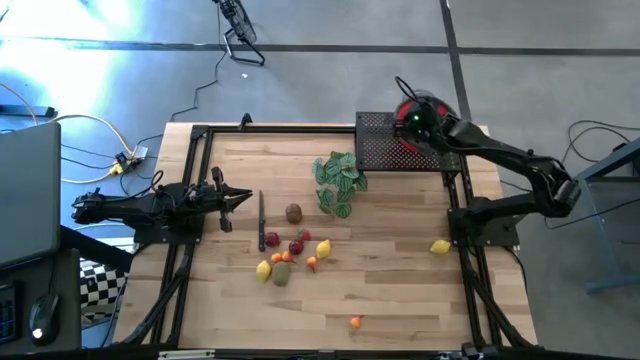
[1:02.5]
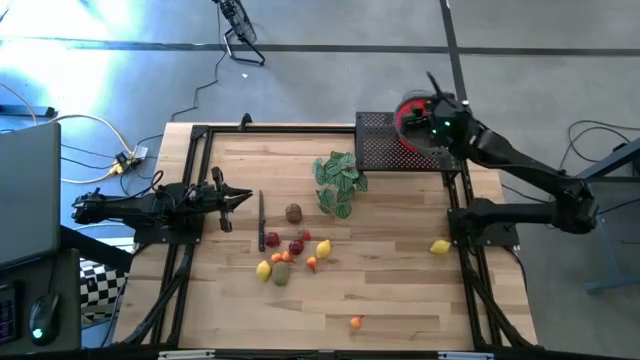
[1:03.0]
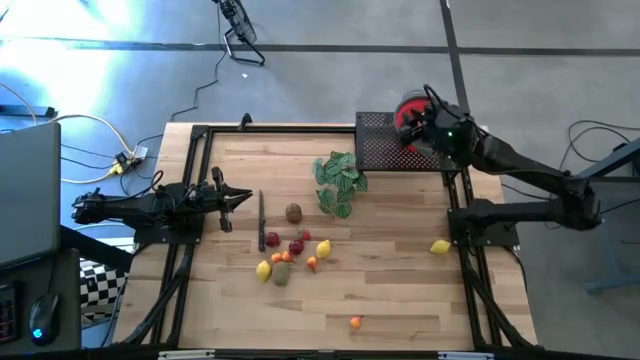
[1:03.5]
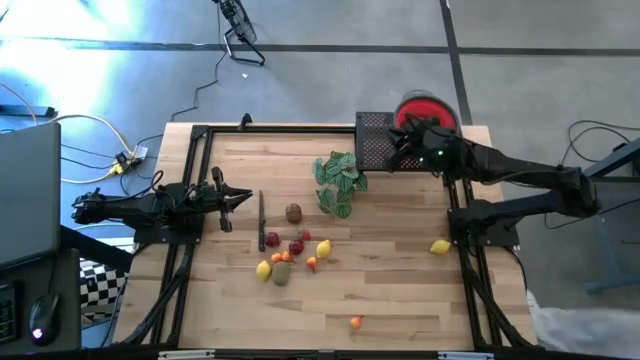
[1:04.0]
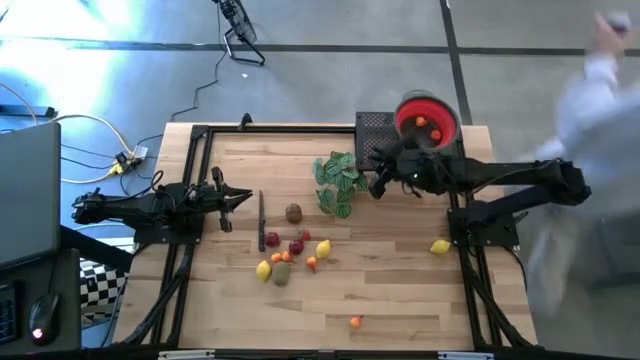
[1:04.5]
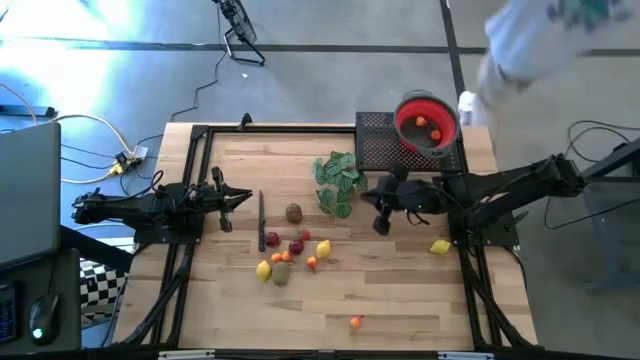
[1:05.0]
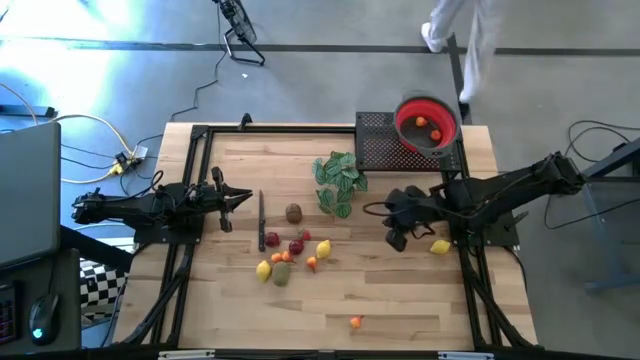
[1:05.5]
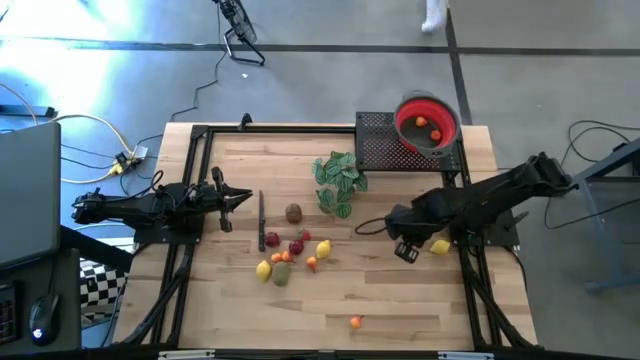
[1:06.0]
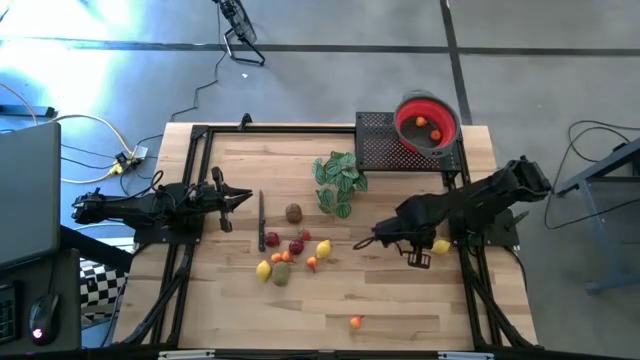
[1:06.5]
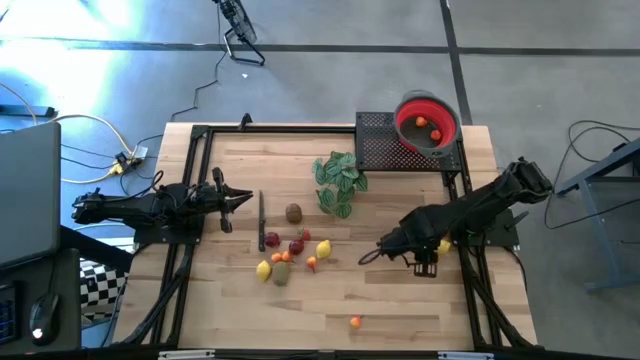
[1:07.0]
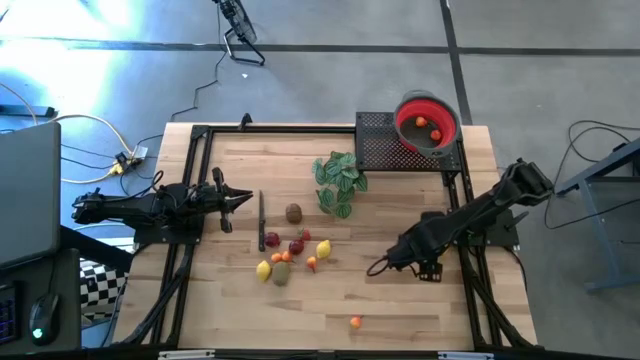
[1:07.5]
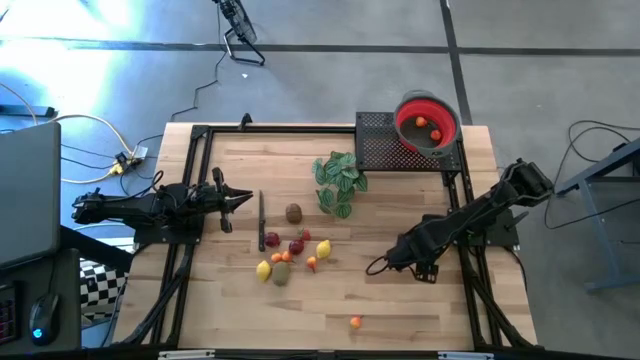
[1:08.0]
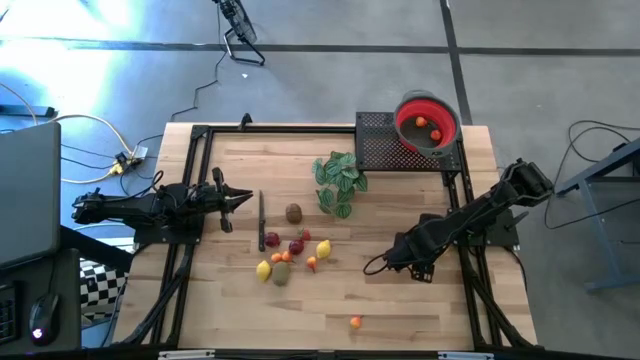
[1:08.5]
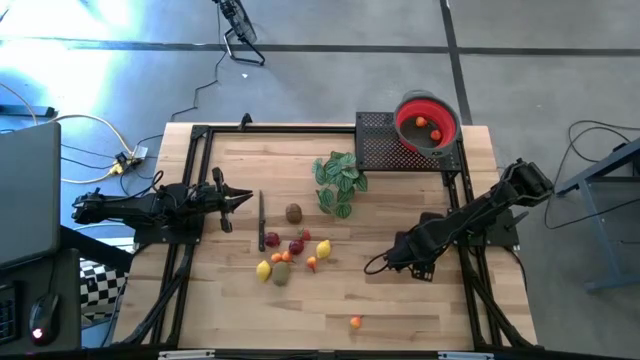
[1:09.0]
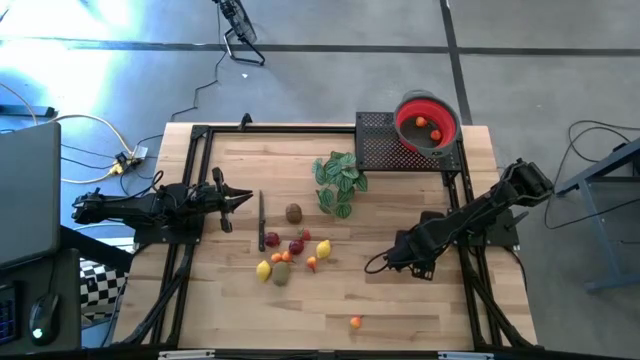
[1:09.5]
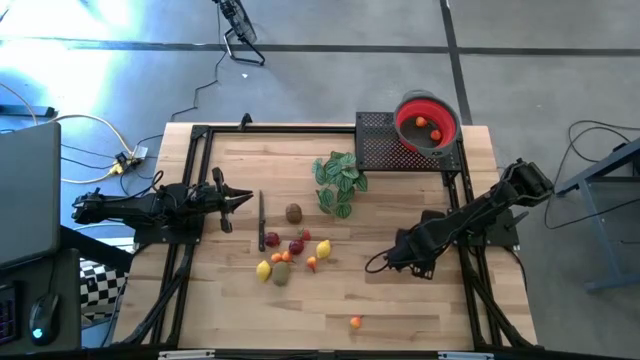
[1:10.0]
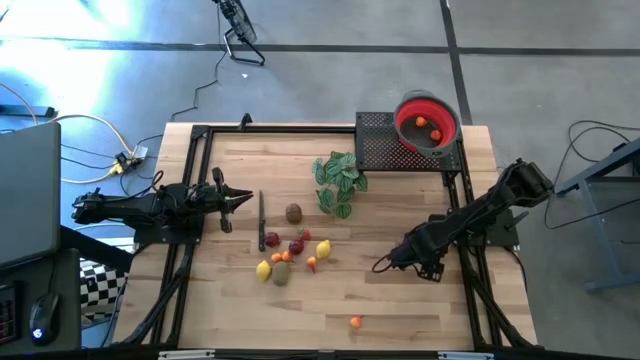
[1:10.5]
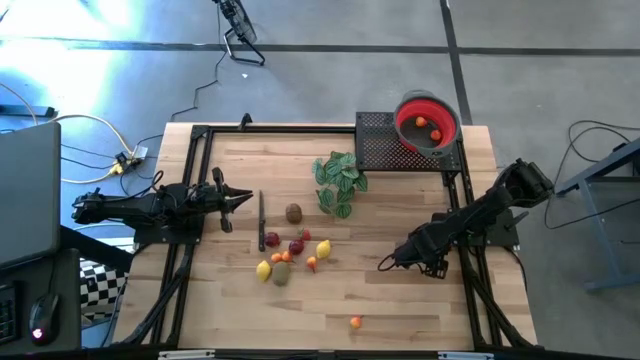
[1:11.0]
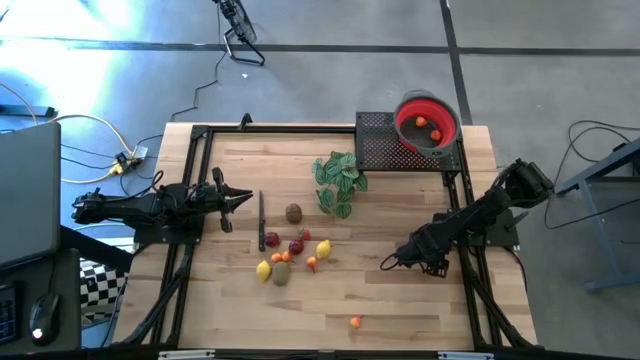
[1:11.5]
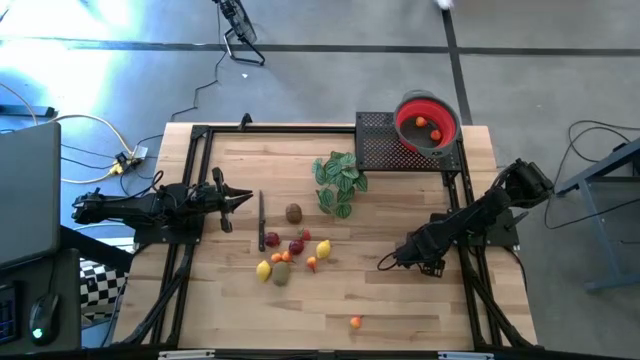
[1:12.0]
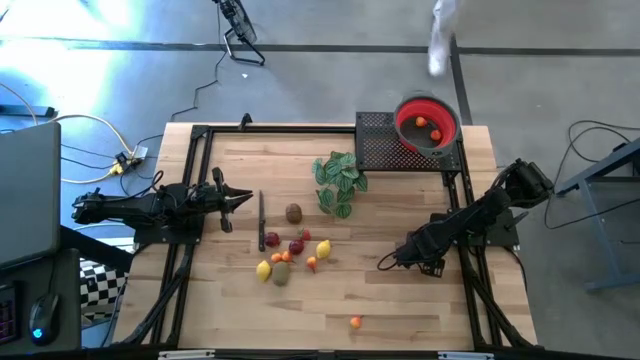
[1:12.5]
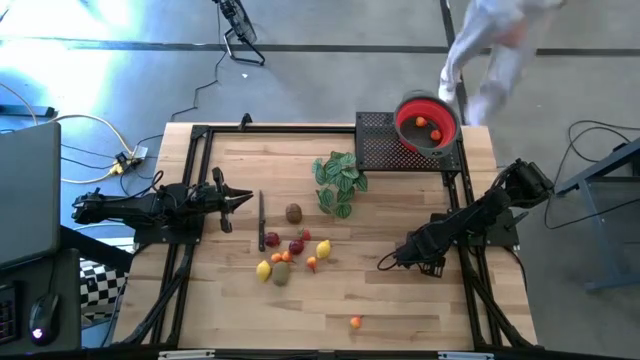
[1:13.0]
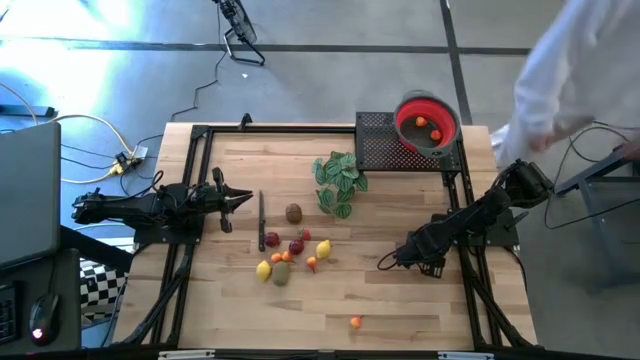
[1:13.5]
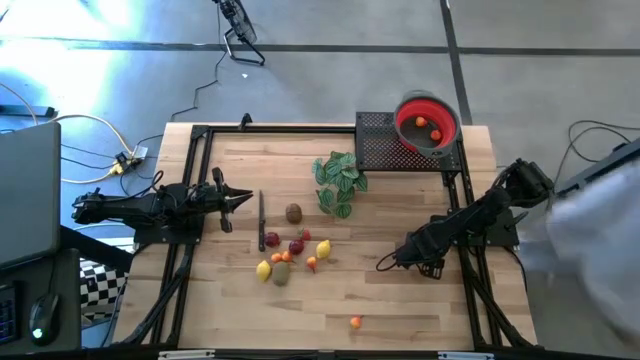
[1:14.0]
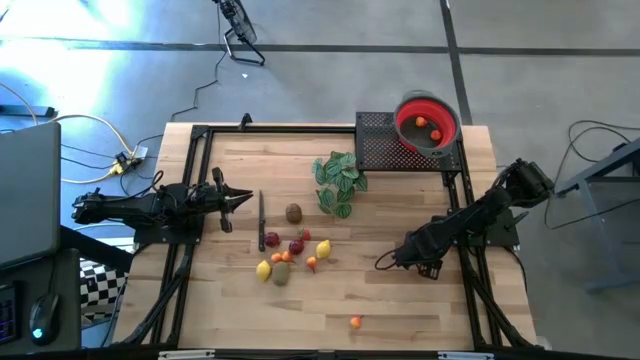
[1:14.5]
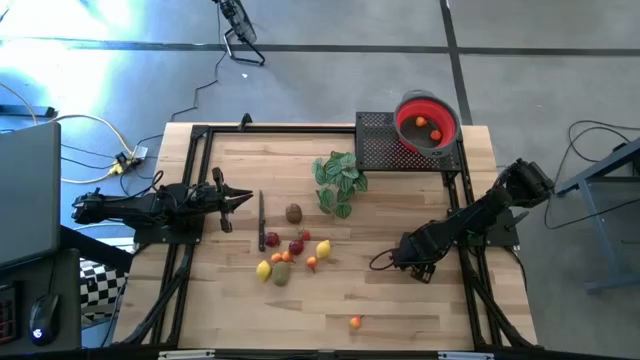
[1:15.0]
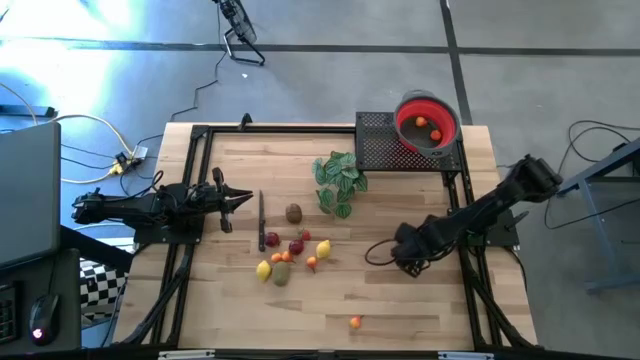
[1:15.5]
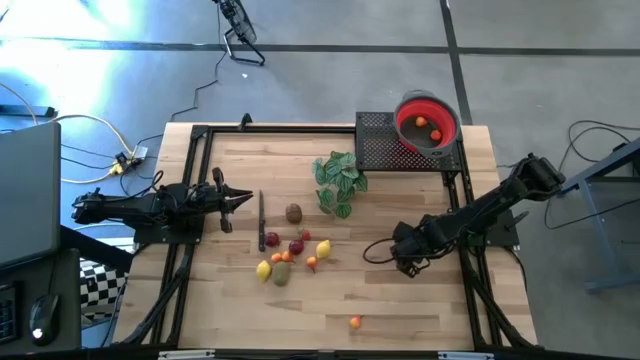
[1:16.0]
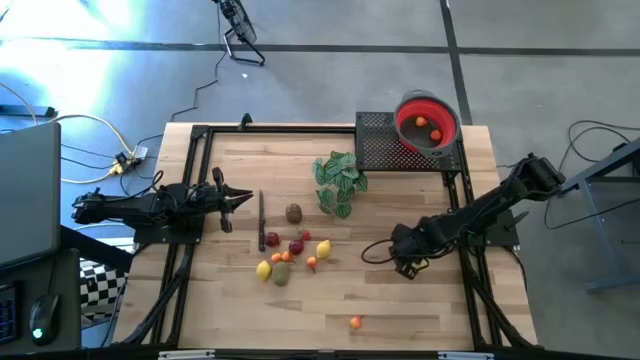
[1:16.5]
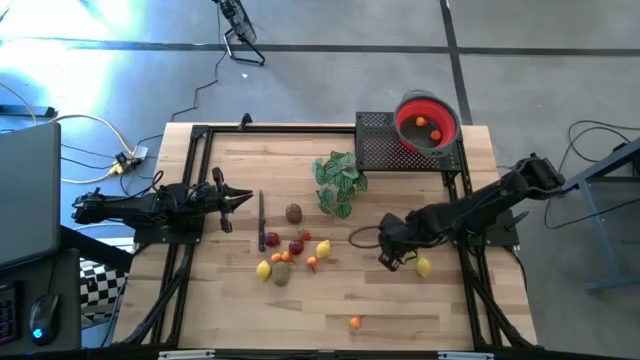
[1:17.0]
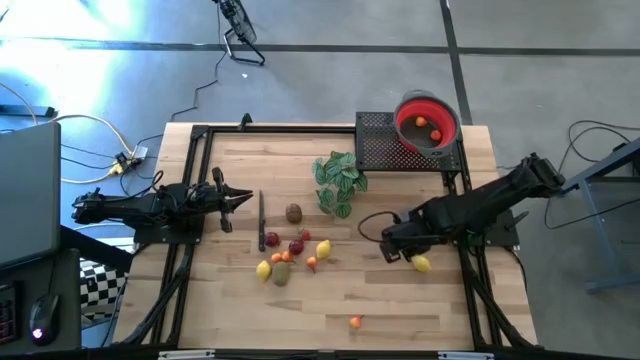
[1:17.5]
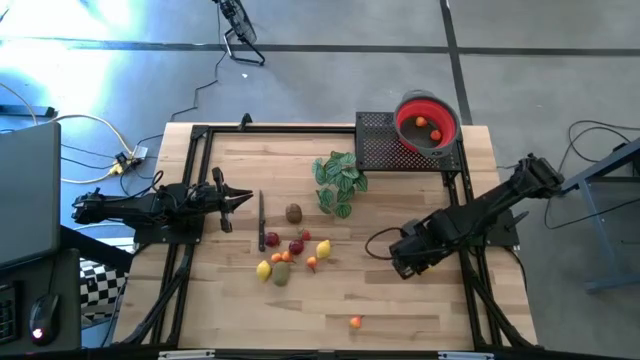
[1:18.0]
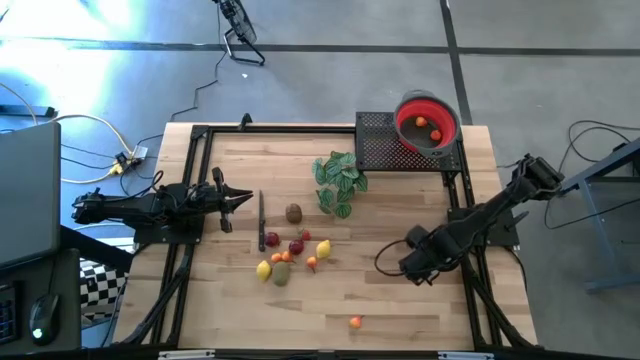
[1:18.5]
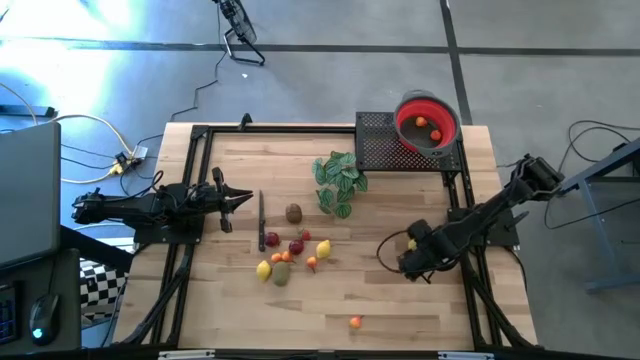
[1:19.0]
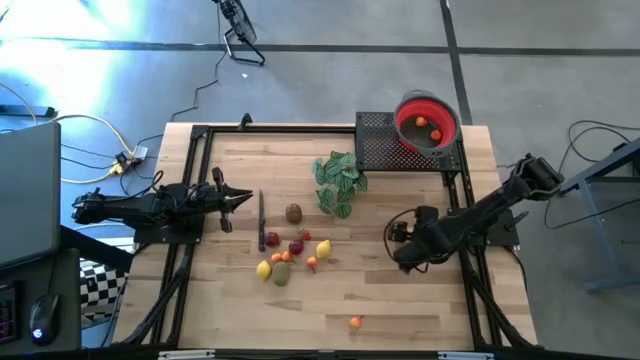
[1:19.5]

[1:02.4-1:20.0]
Task: Pick & Place Fruit
Put the lemon into the red colander

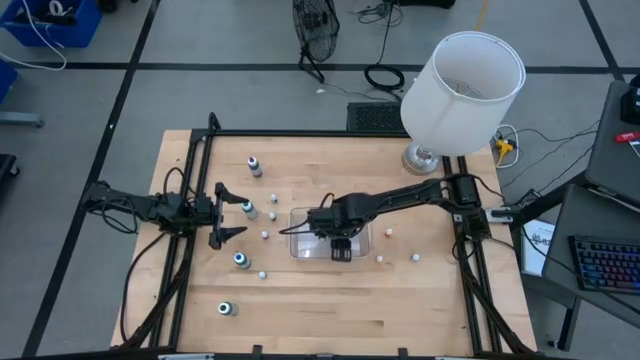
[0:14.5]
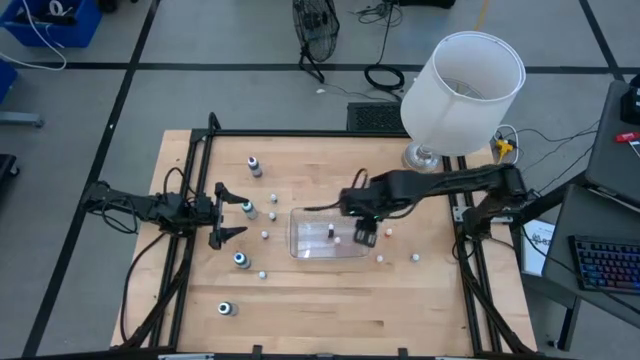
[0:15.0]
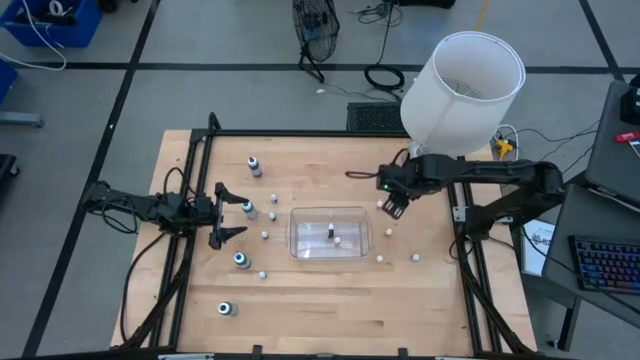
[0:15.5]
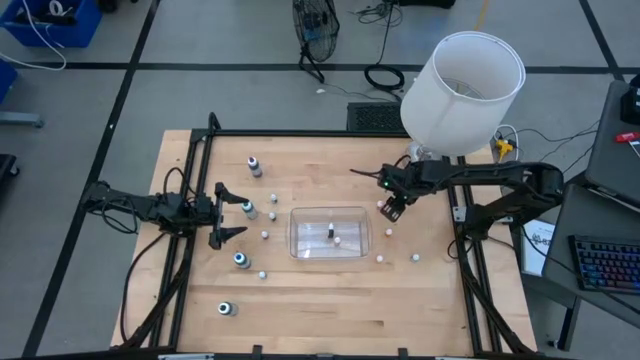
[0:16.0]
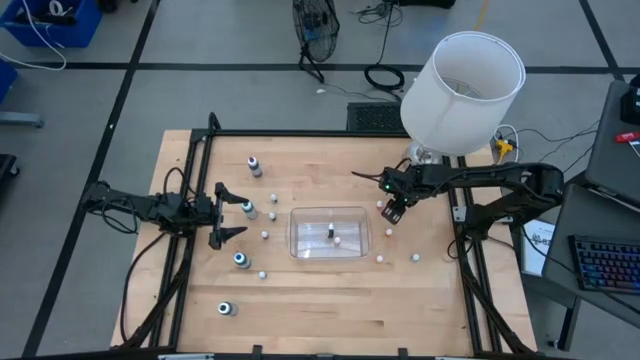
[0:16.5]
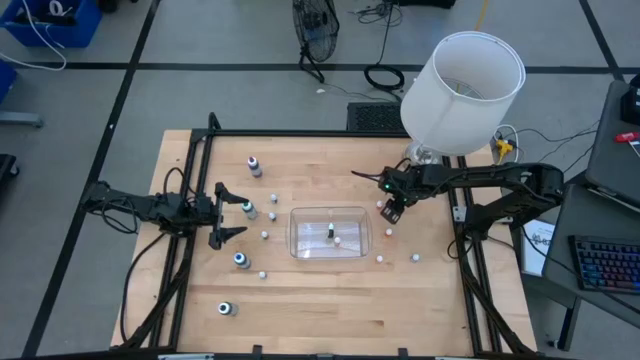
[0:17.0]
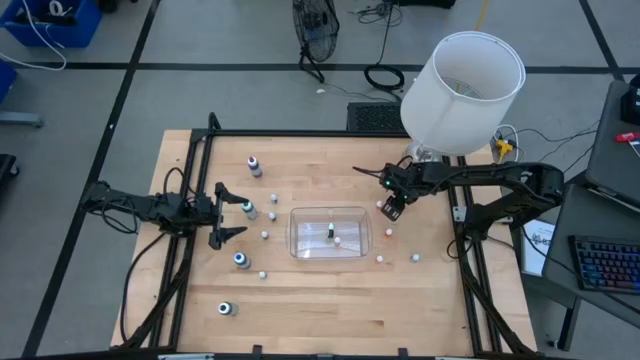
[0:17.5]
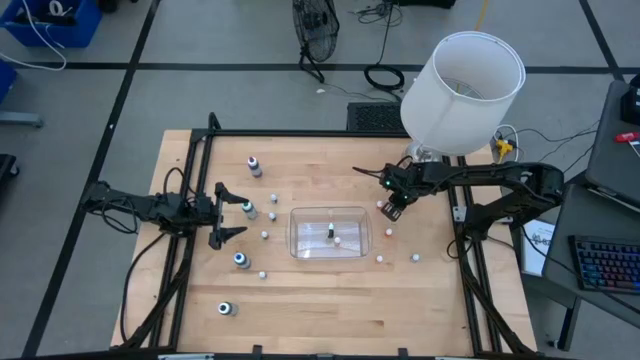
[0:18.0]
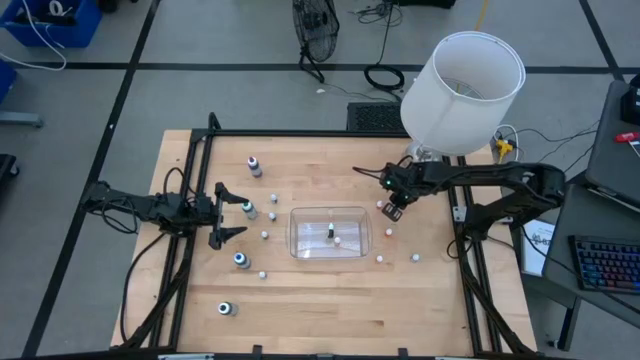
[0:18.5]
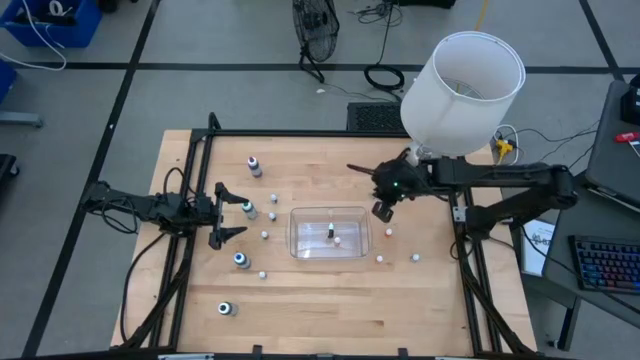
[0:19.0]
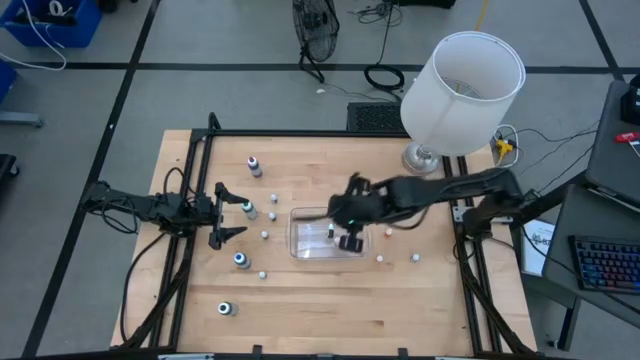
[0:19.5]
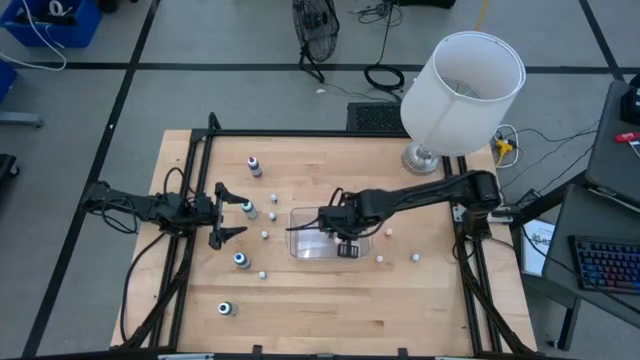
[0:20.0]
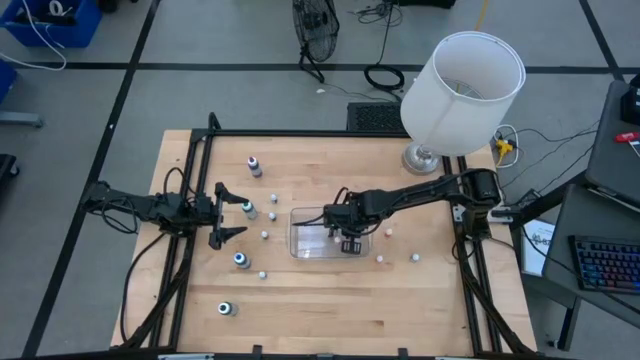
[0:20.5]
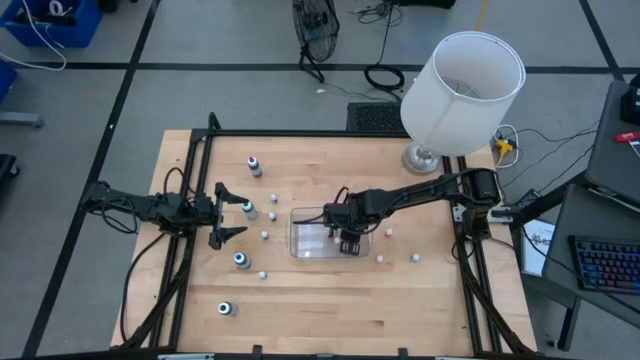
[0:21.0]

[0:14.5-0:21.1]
Task: Pick & Place food coloring
Put the small black food coloring bottle into the transparent bin
